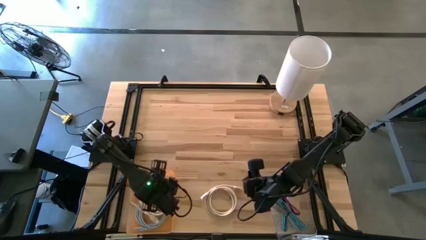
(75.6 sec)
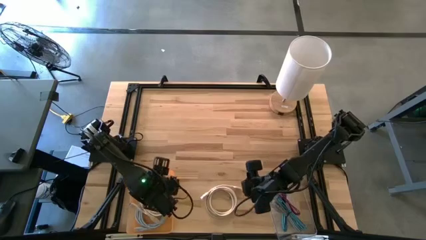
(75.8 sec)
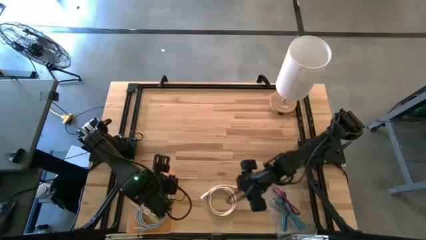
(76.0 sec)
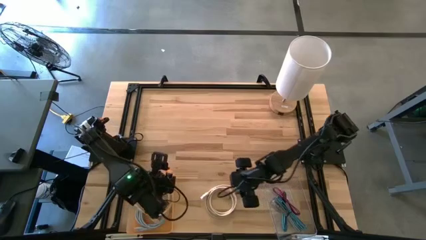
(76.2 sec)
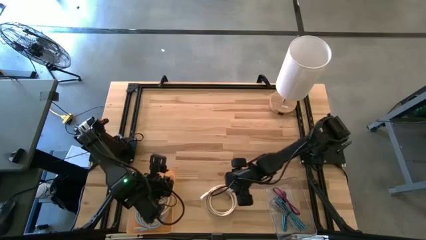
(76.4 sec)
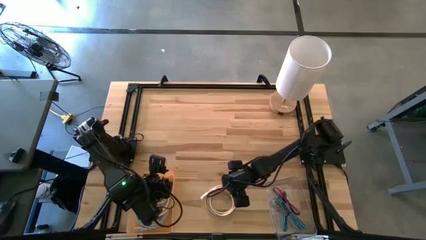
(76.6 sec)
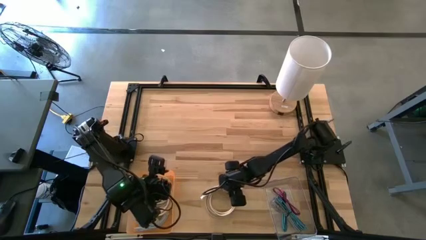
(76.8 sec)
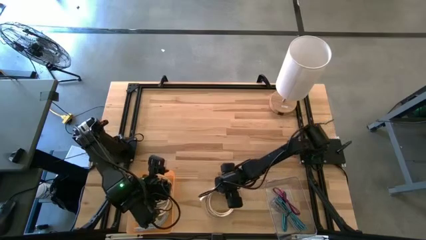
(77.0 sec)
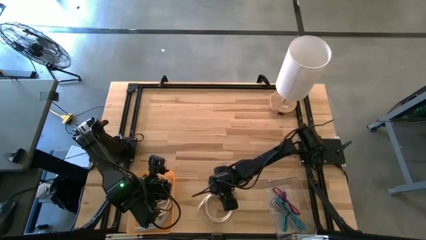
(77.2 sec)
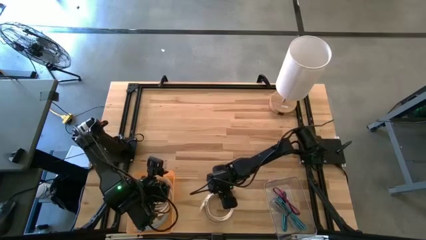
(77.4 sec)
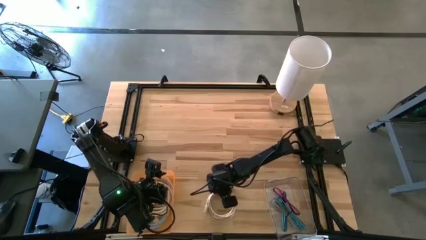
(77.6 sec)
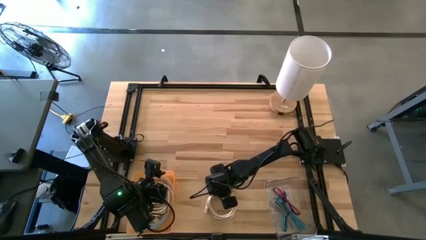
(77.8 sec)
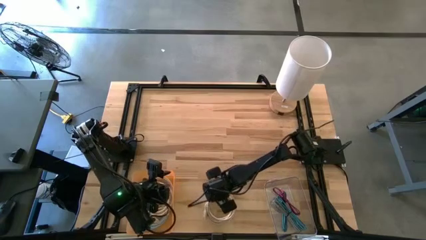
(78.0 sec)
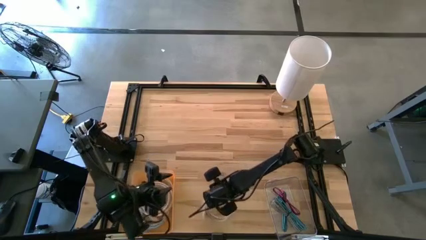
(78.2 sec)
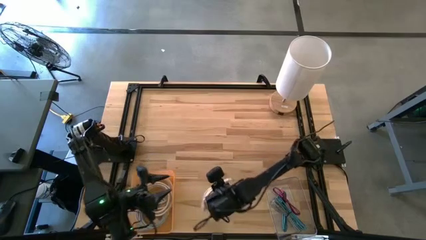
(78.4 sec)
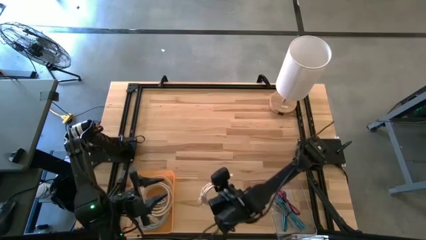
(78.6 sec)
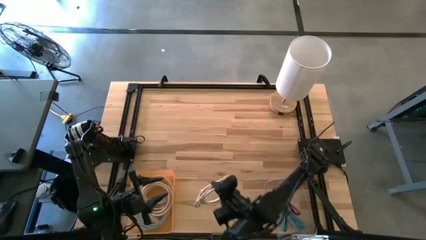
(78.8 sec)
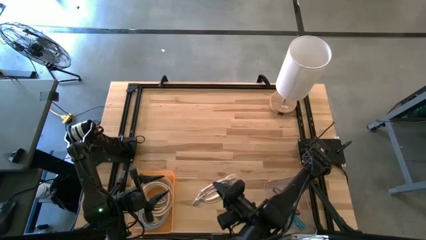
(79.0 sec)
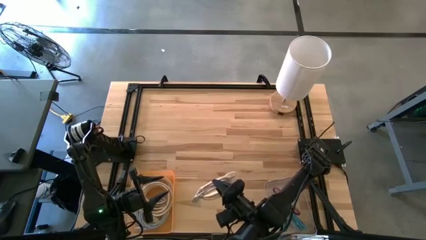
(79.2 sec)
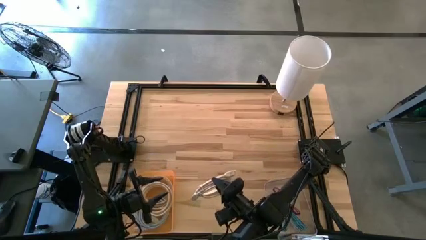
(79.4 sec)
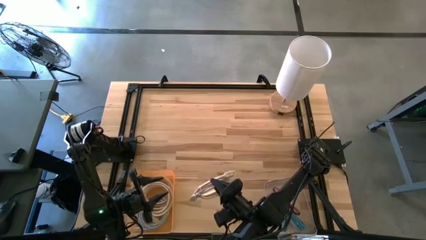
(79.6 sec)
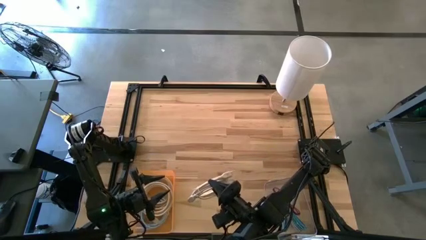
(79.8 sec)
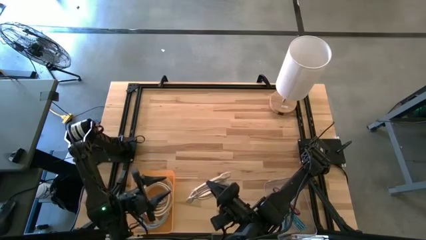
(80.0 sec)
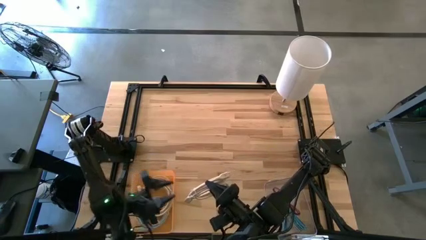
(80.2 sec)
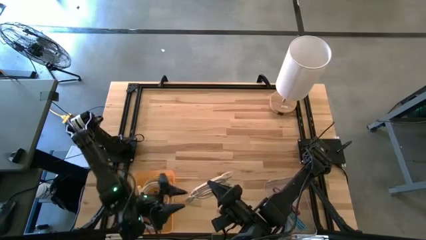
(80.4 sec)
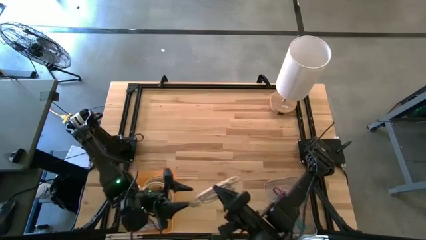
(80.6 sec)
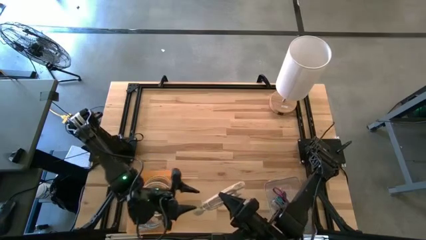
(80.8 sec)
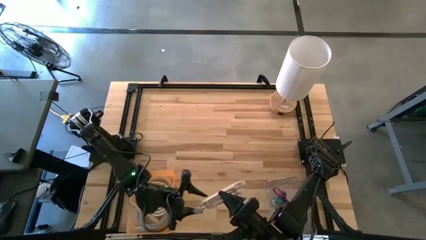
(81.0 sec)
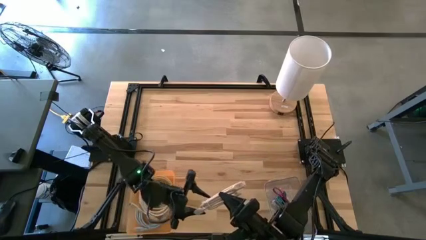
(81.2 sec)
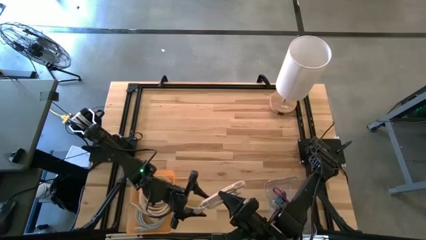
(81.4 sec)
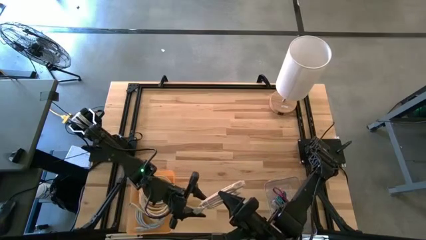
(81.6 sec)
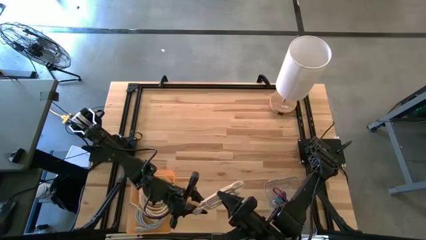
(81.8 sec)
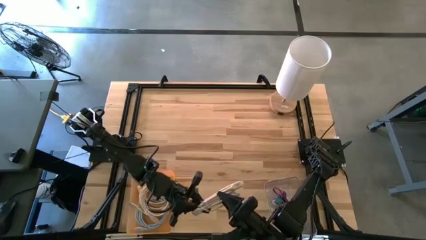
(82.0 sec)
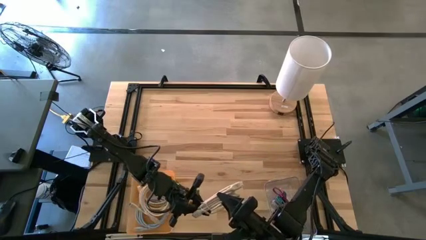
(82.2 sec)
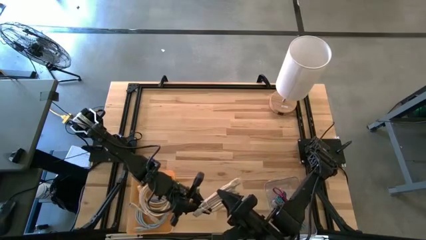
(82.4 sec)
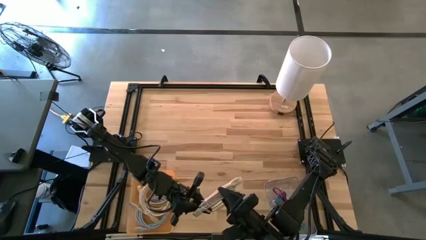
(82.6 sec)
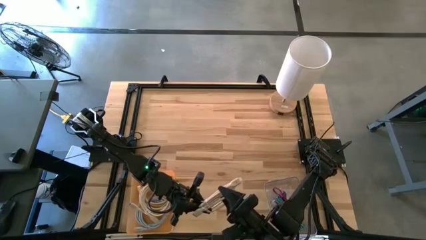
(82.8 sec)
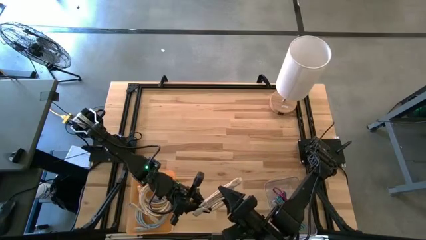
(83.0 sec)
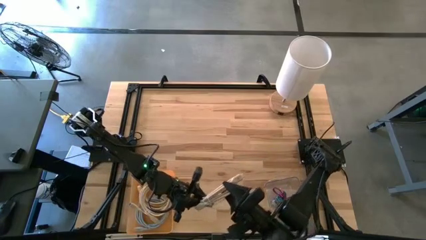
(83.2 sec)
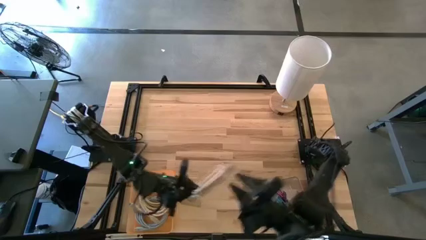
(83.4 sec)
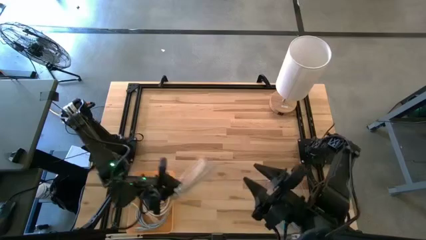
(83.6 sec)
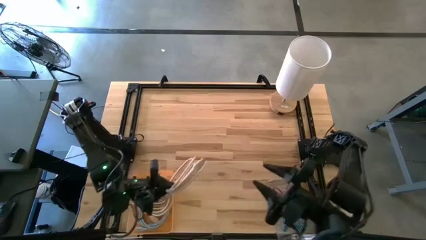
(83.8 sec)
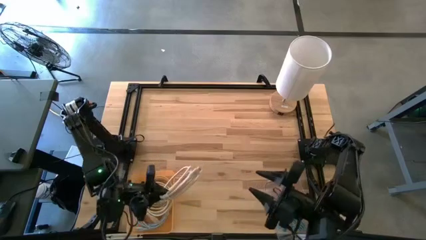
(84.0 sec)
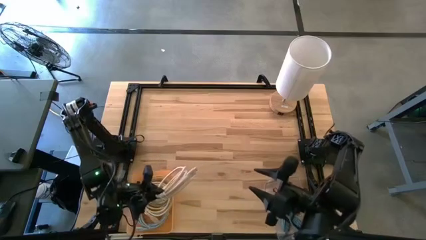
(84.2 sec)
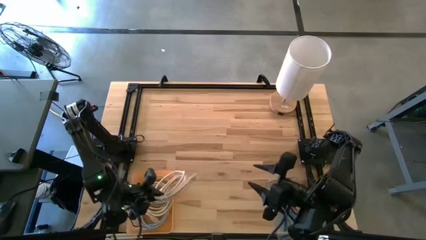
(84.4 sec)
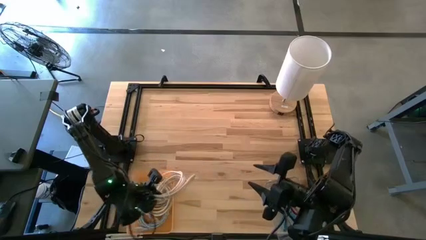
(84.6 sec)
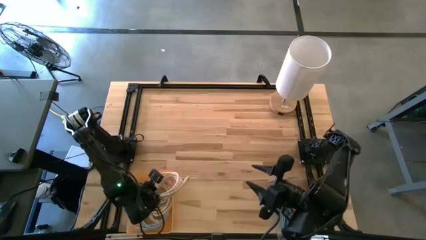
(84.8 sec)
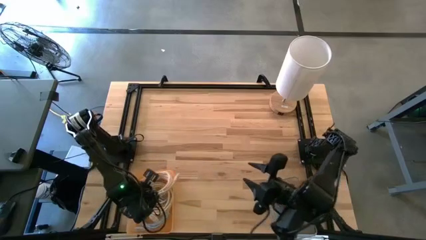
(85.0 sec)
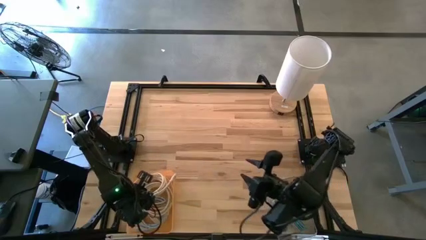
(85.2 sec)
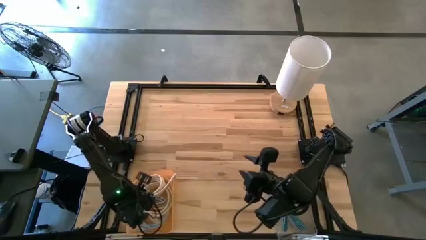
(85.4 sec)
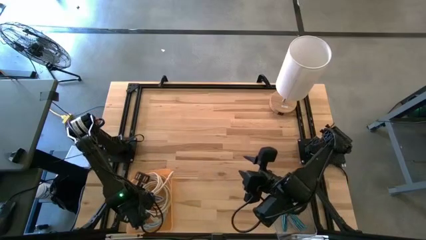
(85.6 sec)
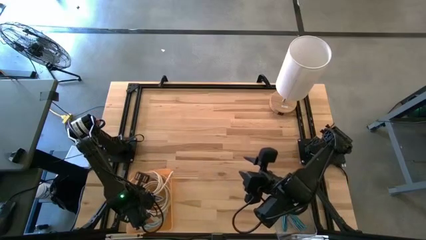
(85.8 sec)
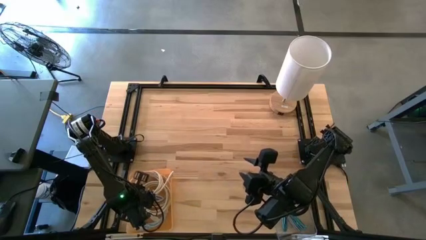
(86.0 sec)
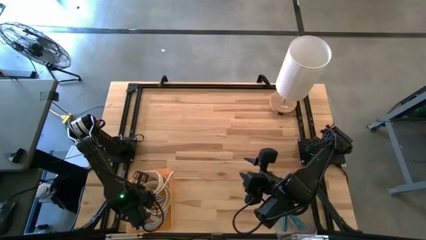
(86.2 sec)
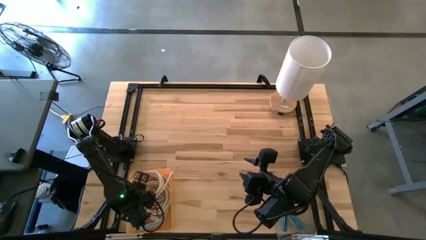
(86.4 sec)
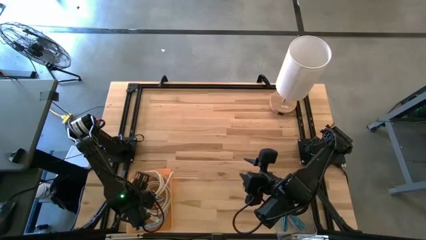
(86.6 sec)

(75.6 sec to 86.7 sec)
Task: Pick & Place USB Port
Put the light brown HDMI cable into the orange bin

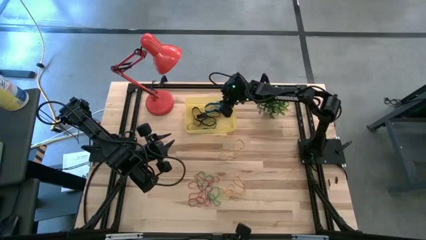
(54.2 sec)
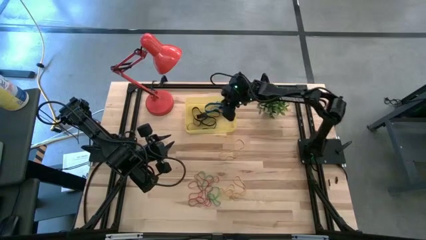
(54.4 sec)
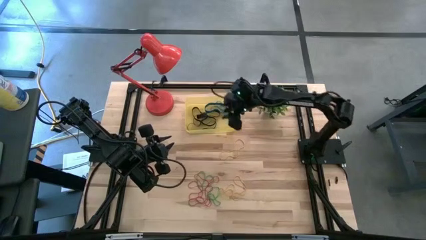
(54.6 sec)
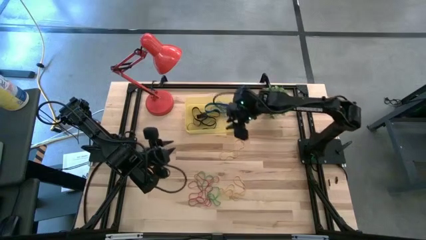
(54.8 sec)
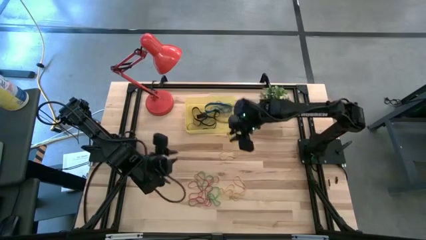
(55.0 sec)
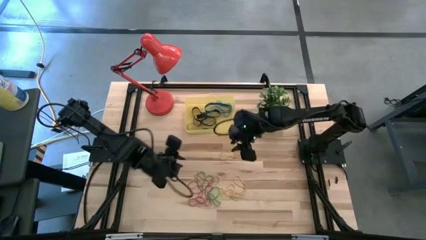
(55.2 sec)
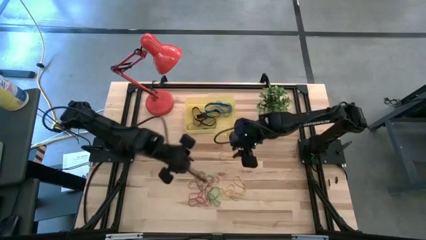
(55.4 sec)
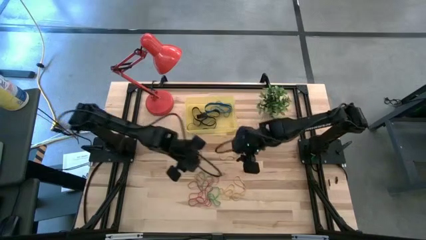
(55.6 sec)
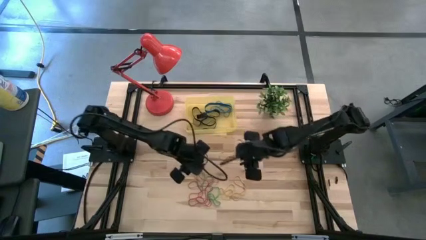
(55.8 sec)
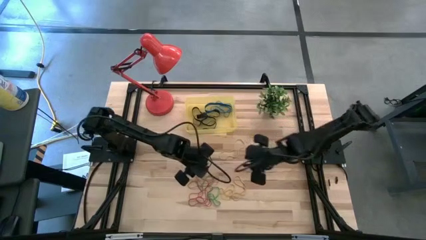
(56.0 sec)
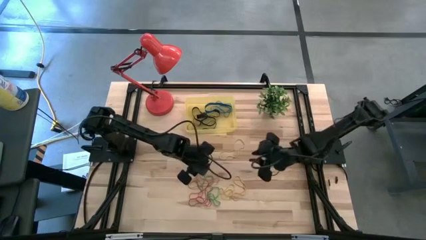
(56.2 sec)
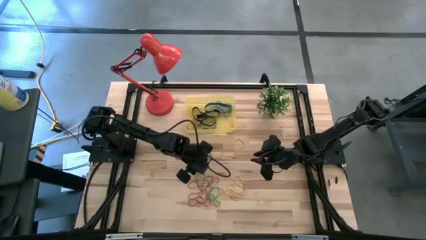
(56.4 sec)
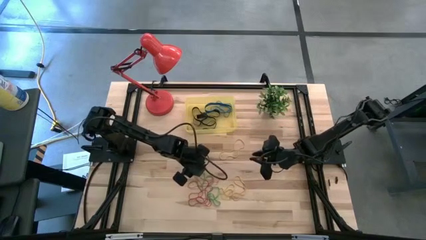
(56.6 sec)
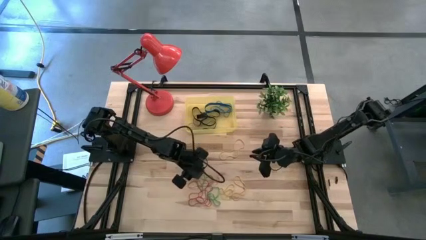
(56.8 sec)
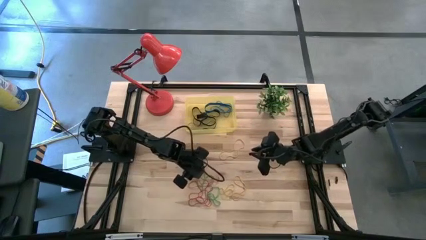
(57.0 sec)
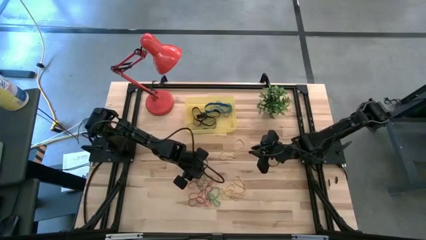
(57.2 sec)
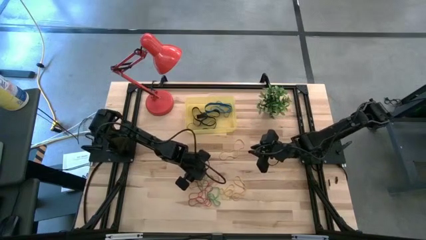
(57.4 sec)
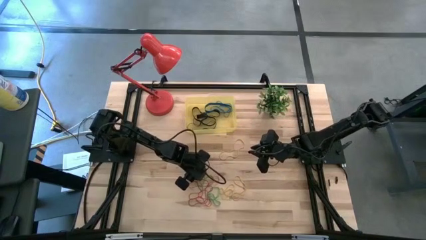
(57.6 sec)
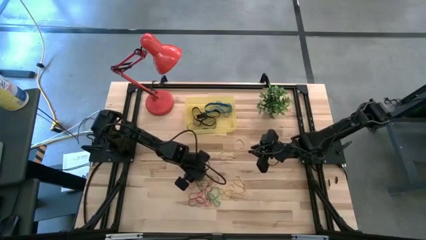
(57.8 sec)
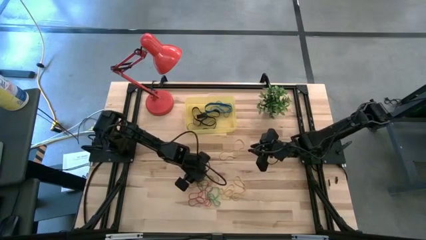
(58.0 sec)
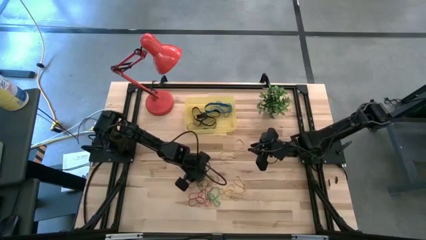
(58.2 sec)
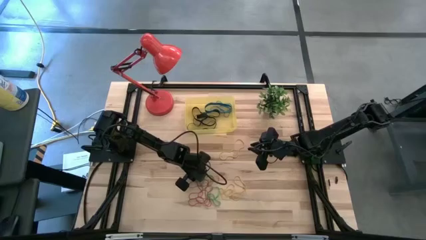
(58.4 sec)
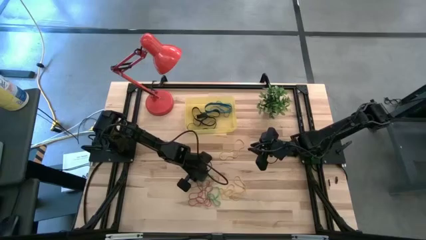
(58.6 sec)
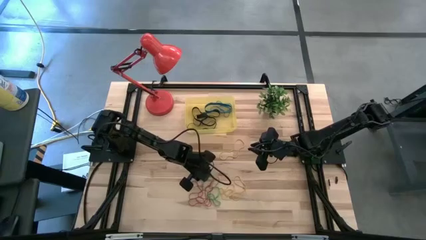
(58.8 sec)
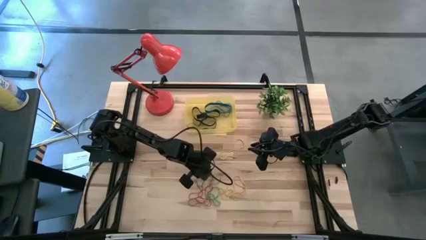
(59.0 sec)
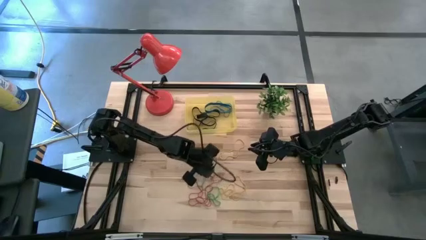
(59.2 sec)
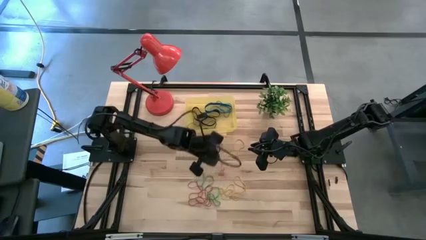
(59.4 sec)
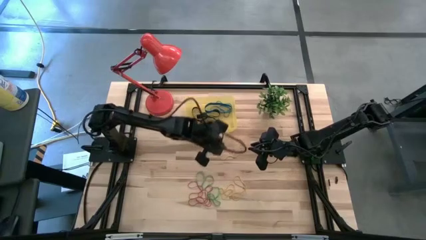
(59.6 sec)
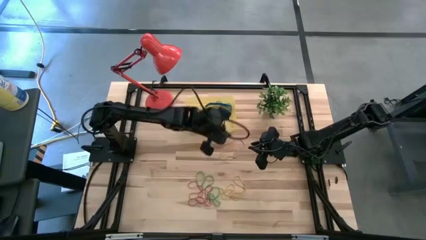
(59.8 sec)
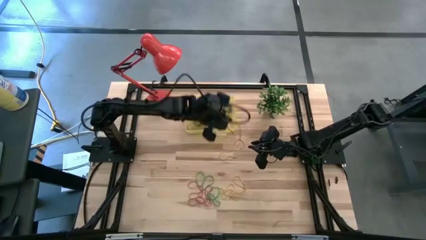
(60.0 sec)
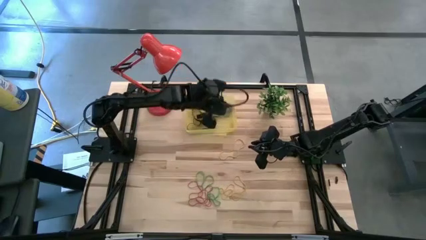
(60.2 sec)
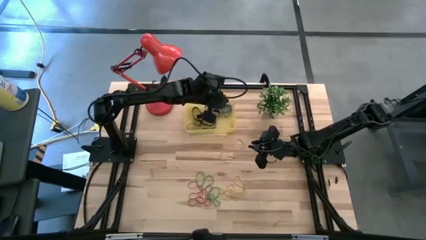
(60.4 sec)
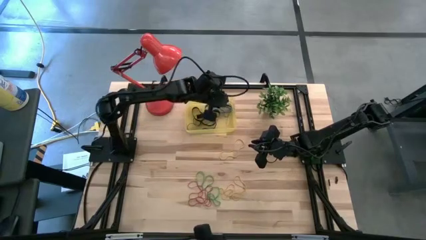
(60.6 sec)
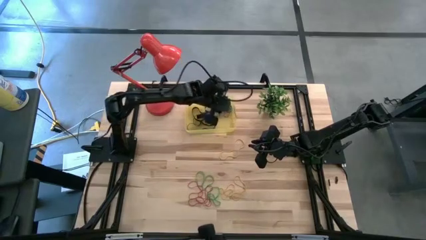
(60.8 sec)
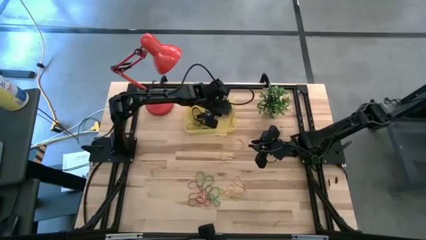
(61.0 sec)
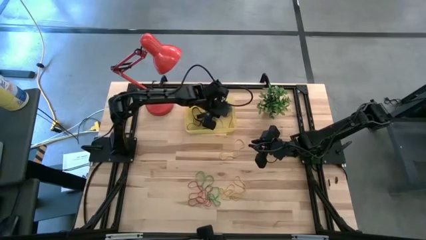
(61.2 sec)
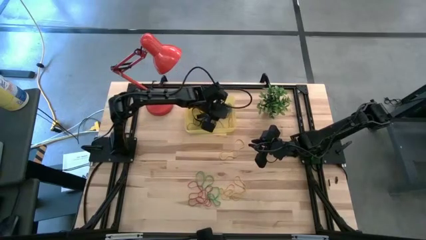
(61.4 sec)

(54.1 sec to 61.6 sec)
Task: Pick and place rubber bands into bin
Put the red rubber band into the yellow container
